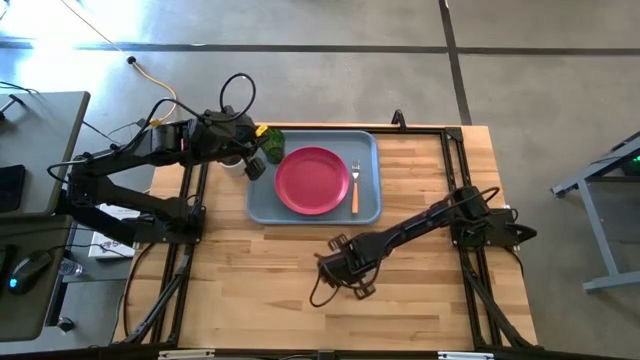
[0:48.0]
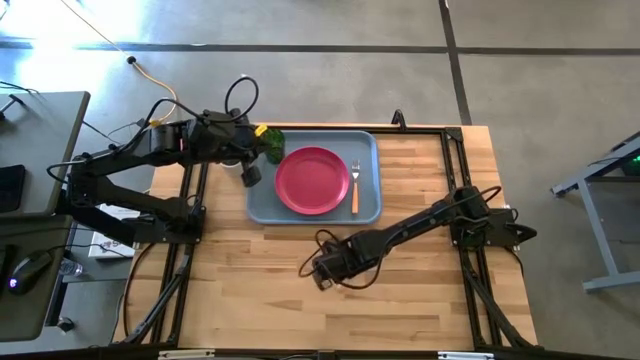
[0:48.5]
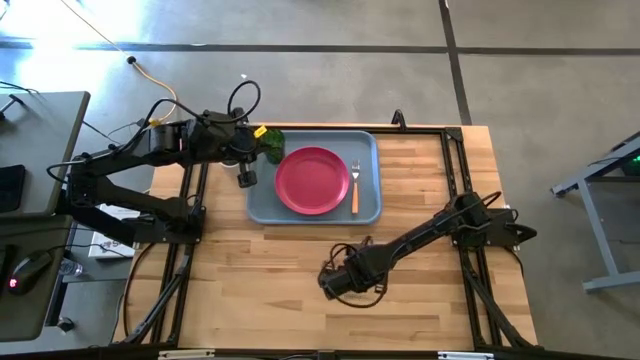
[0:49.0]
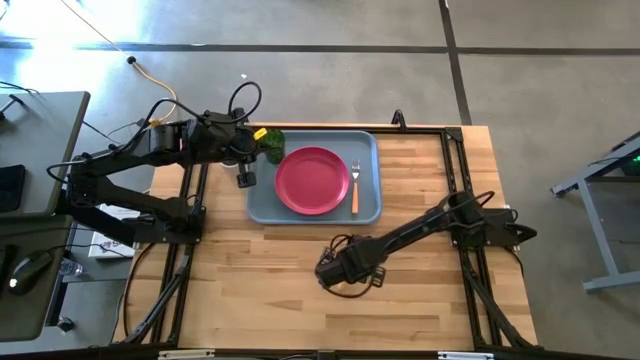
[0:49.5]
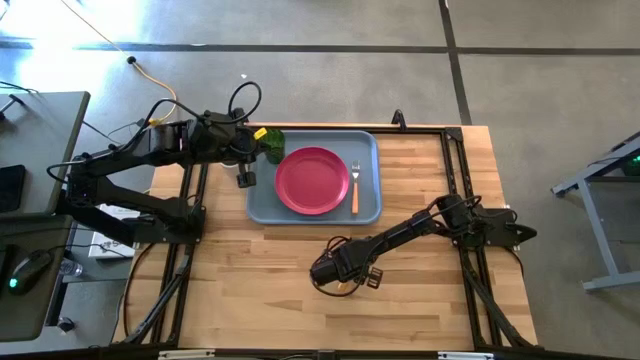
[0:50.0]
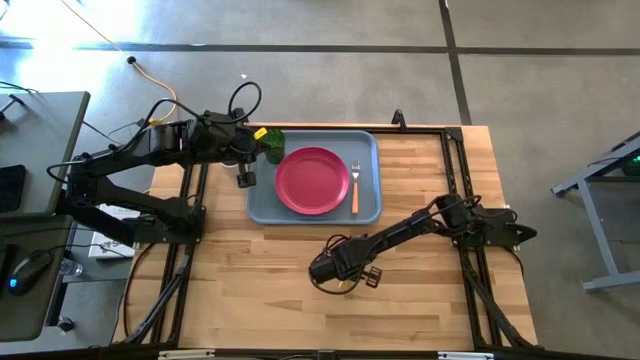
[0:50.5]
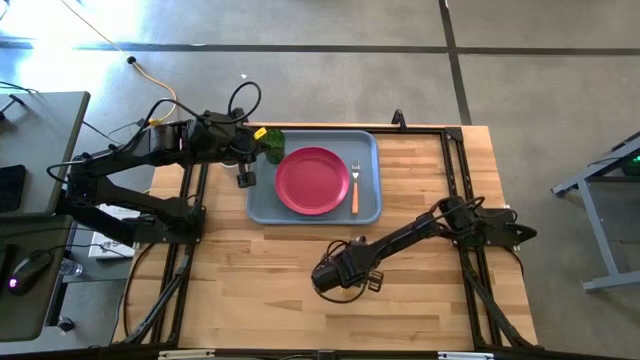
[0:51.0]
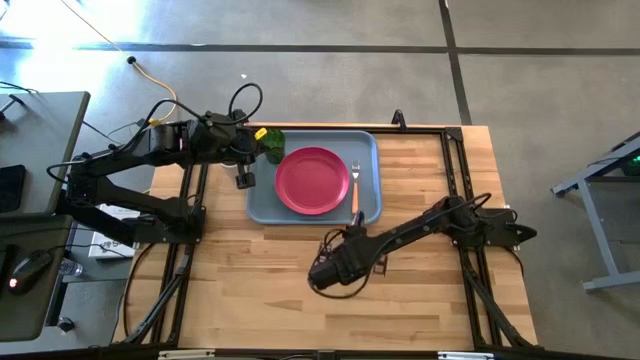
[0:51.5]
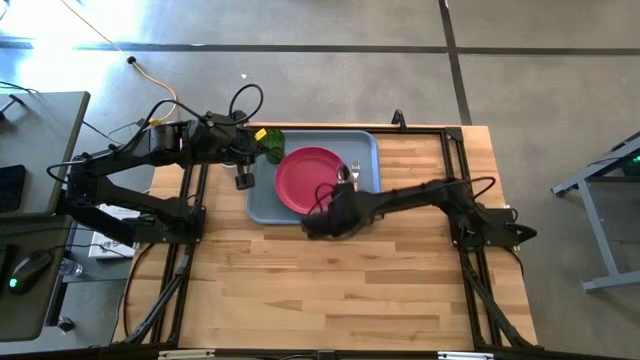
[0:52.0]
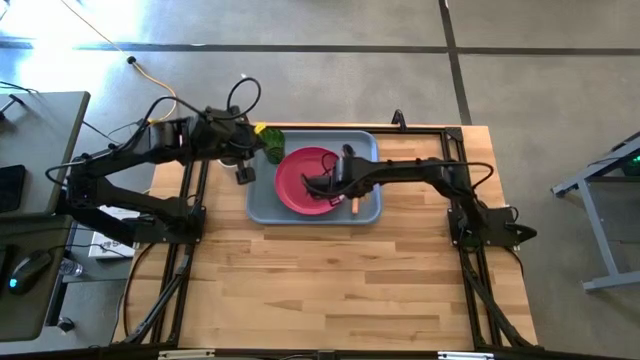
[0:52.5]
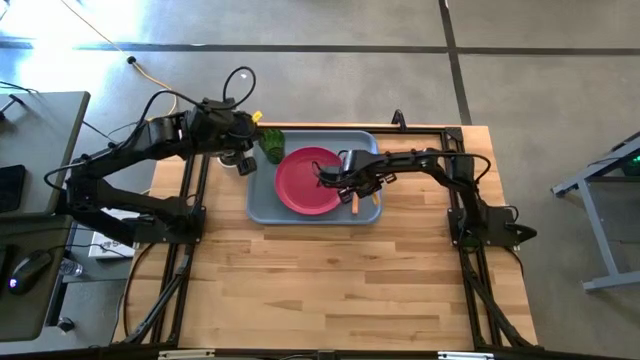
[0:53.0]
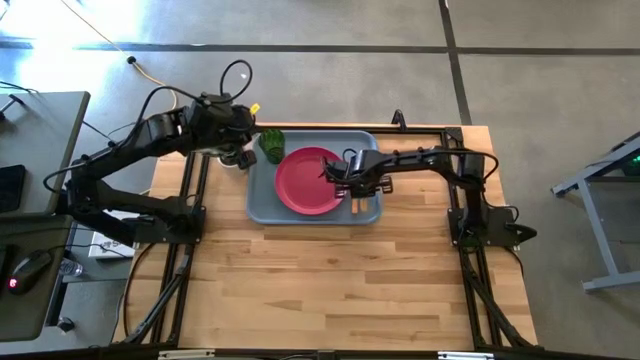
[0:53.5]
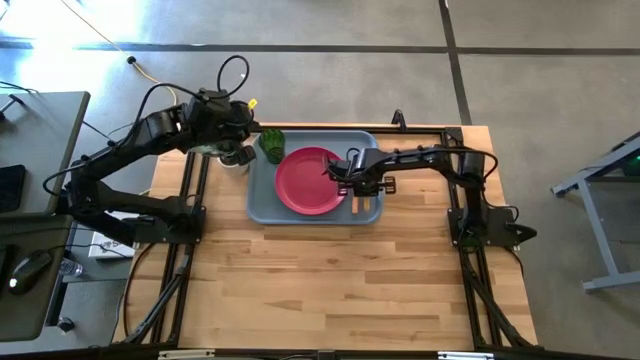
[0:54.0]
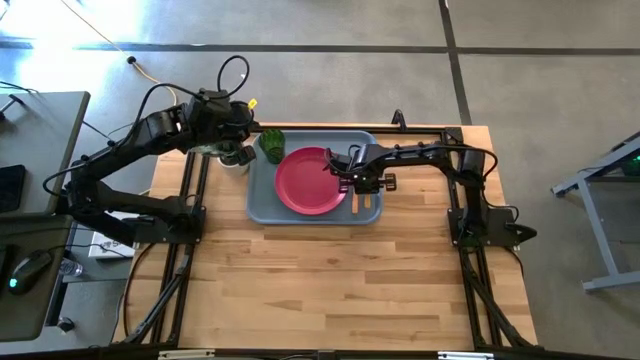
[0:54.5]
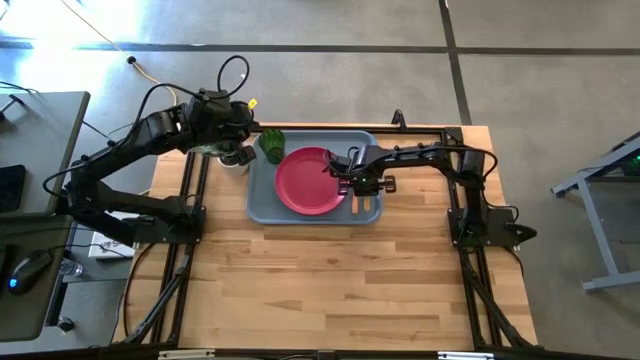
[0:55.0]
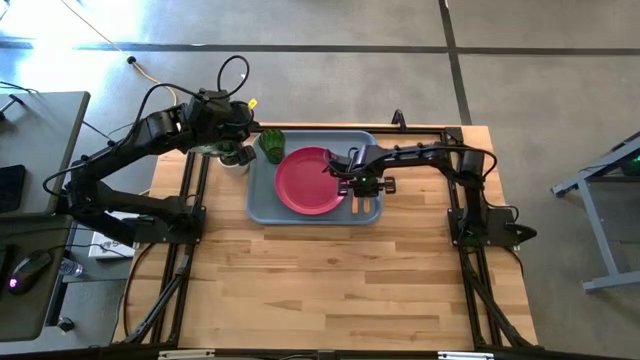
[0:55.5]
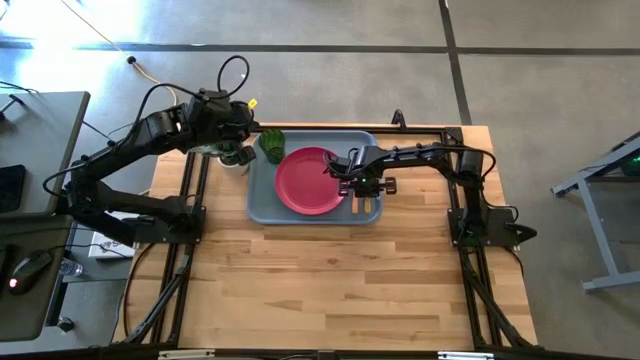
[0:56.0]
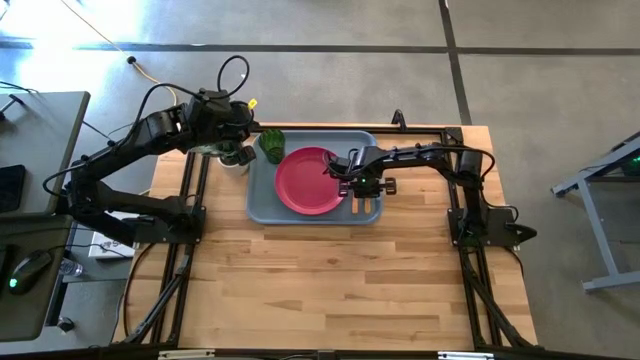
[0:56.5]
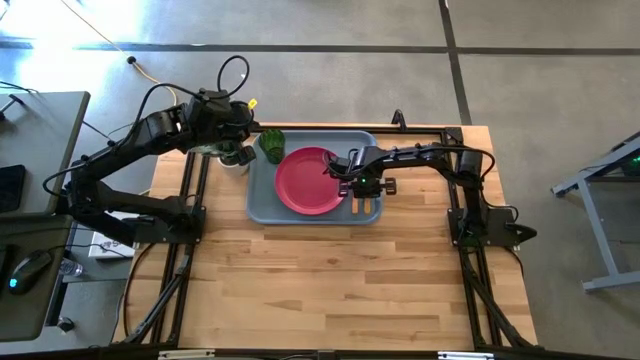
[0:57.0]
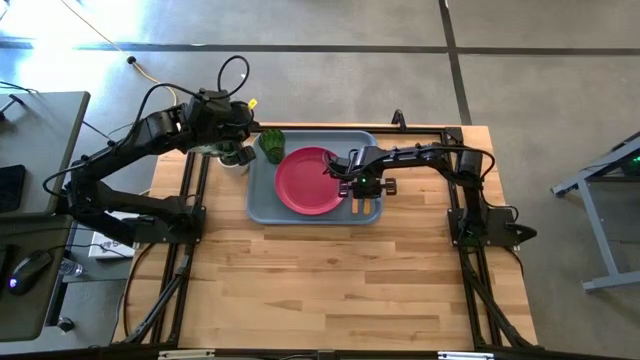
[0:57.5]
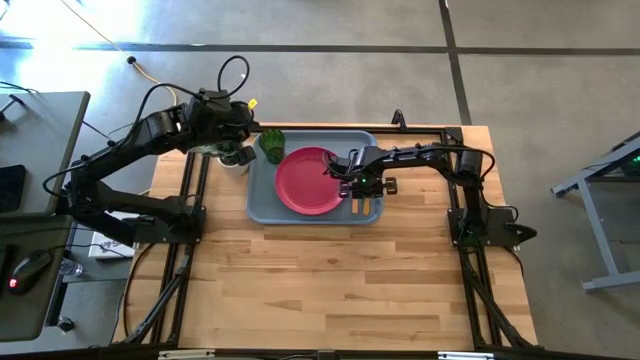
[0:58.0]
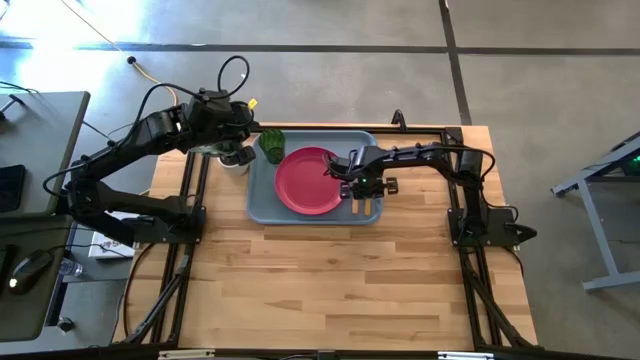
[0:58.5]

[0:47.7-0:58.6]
Task: Pick and place plate/cup/fork/spoon on tray
Put the orange spoon on the blue tray to the right of the orange fork

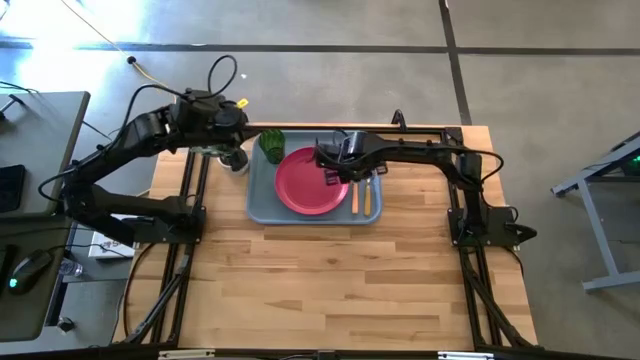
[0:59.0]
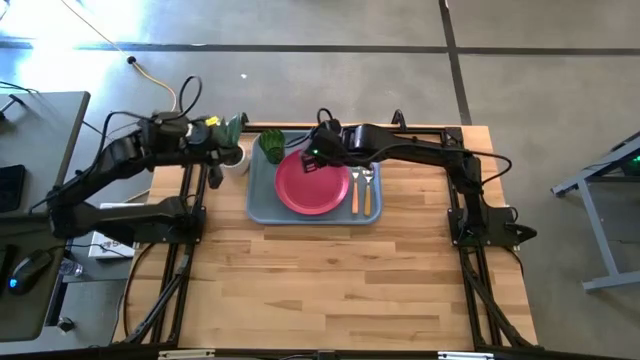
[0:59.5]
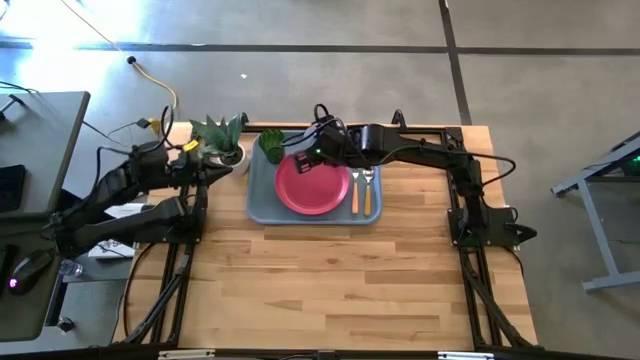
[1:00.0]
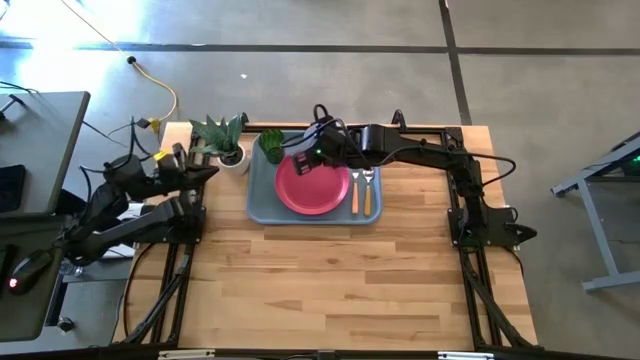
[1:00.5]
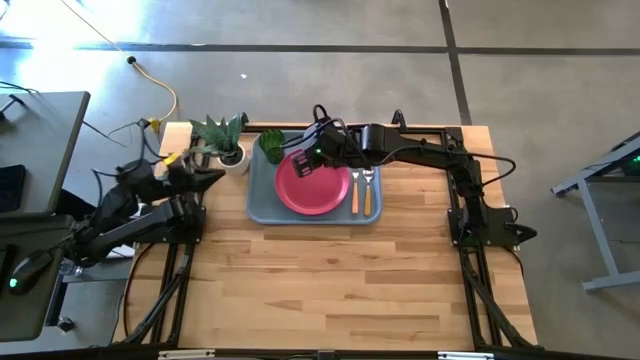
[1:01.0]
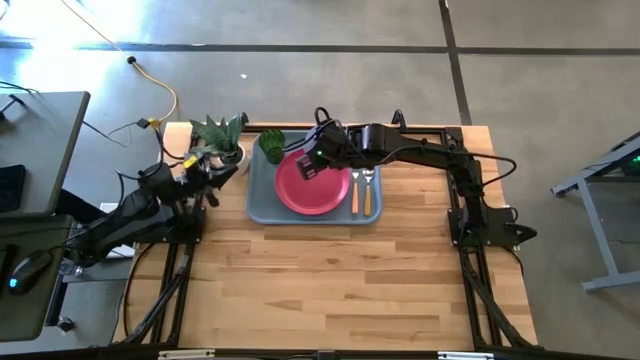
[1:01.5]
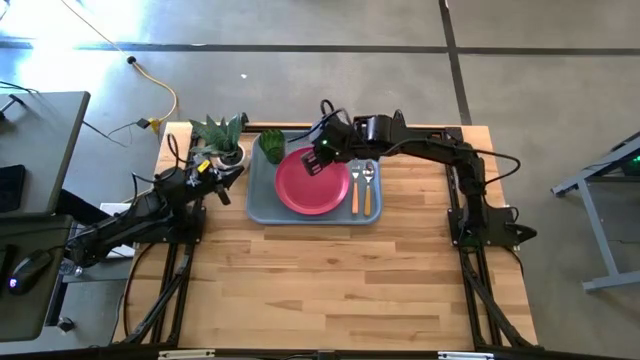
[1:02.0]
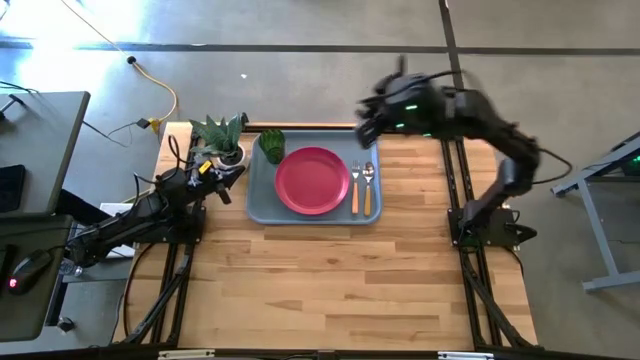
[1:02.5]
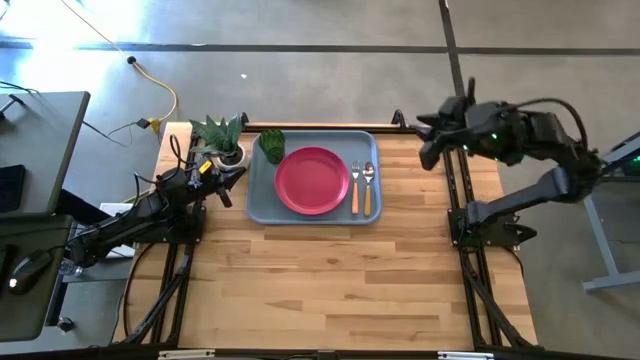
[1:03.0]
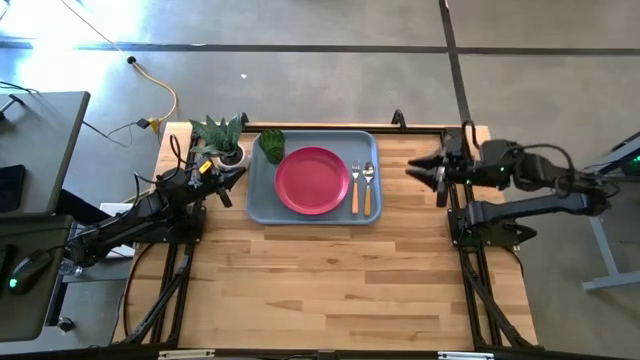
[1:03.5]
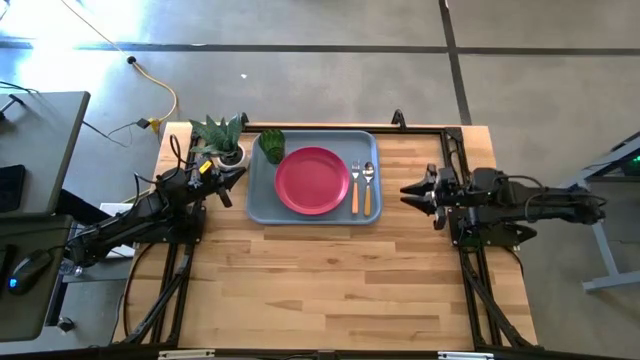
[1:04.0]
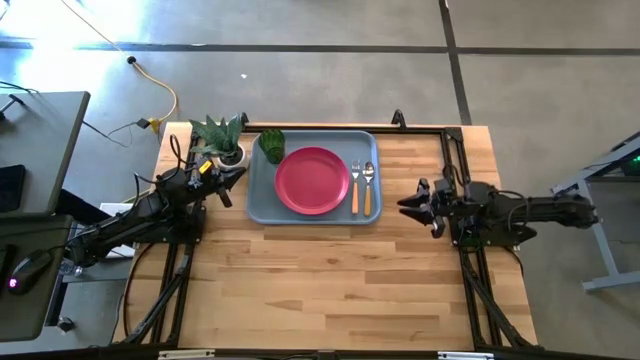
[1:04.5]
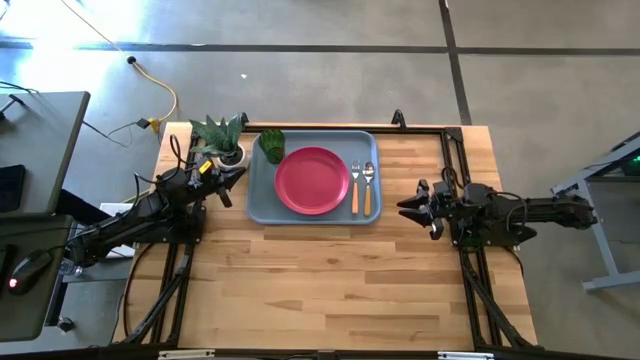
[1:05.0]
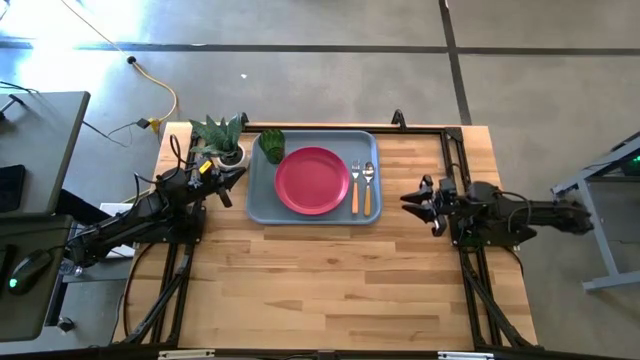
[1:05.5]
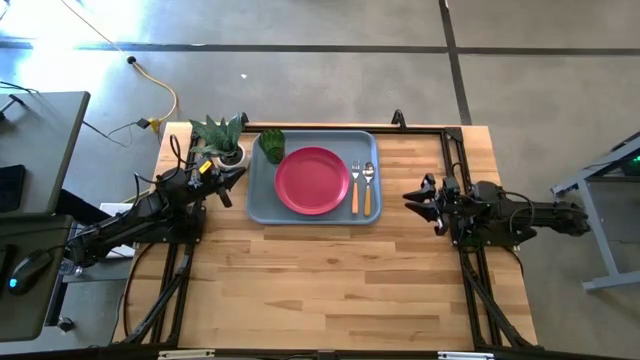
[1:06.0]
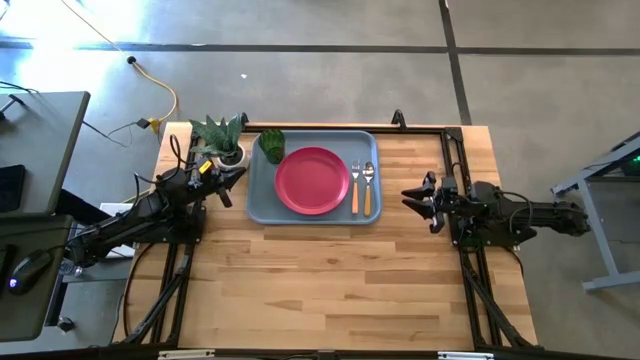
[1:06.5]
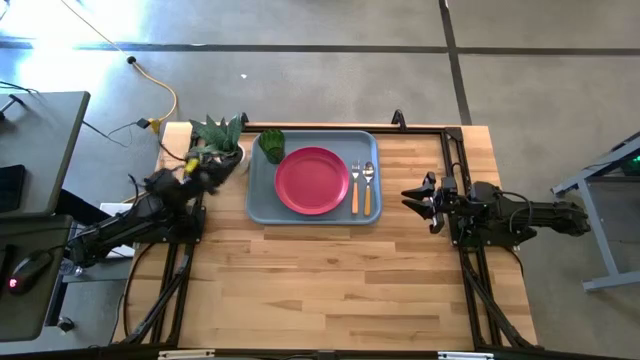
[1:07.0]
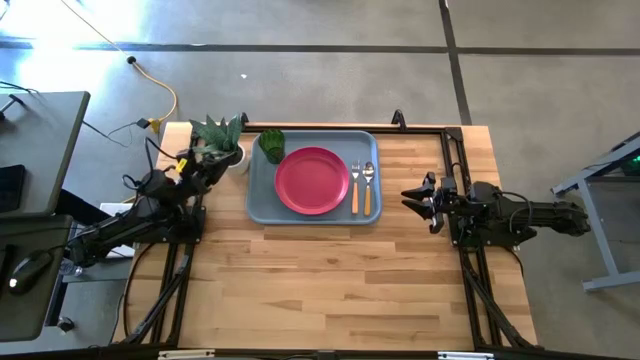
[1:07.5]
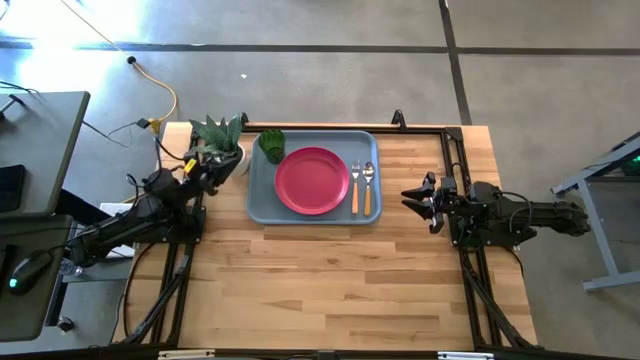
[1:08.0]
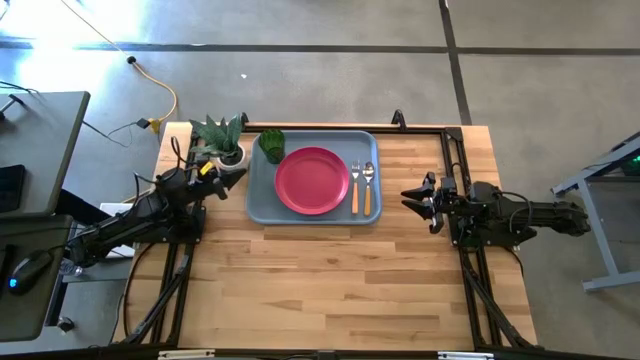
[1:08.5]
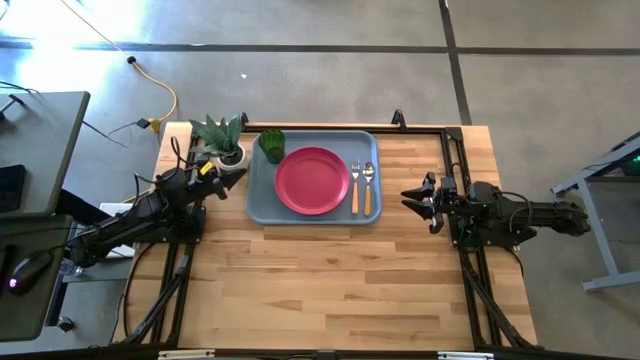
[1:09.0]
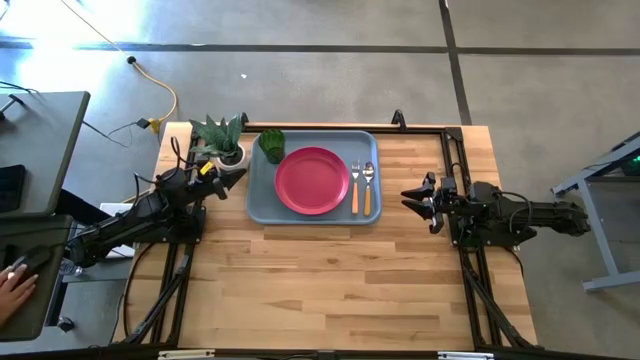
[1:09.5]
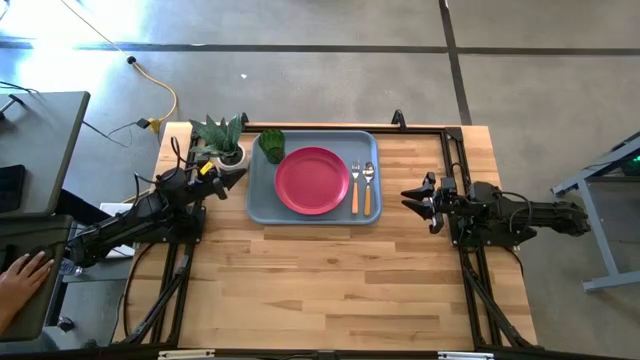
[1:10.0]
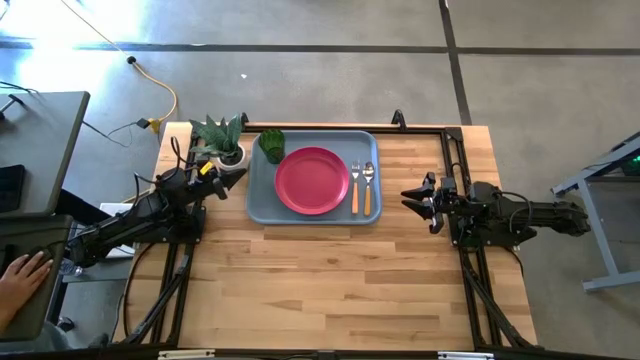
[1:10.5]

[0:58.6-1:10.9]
Return to Home Position
